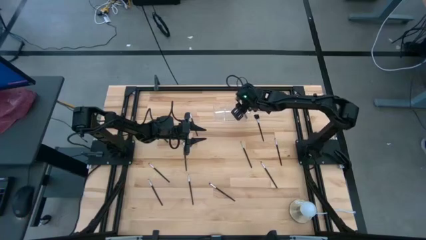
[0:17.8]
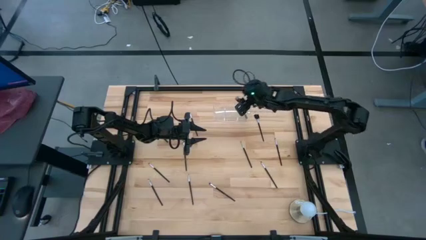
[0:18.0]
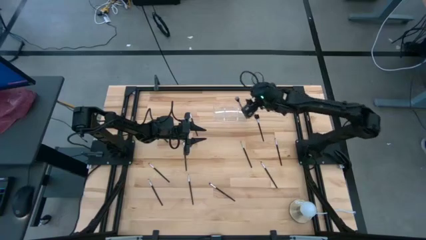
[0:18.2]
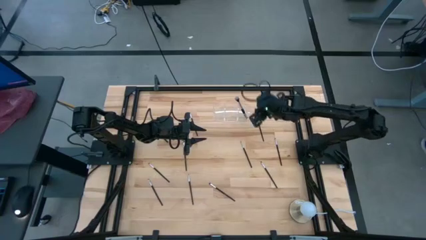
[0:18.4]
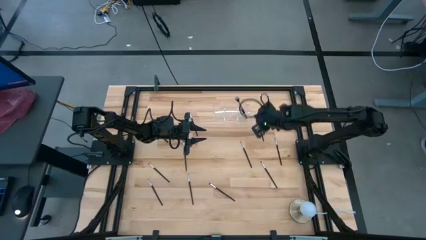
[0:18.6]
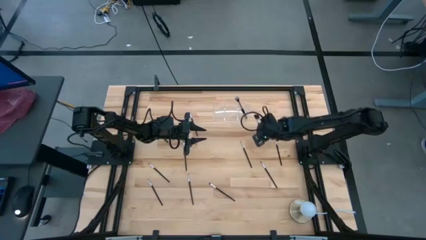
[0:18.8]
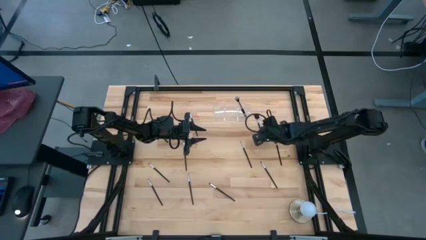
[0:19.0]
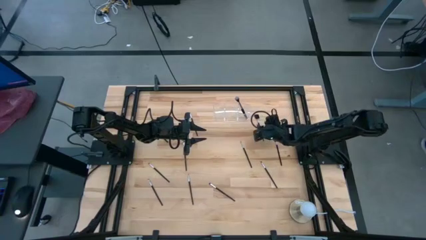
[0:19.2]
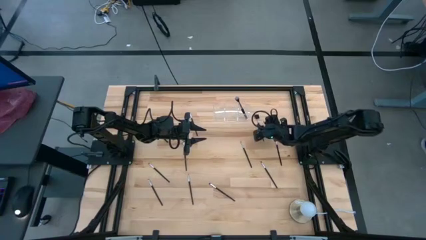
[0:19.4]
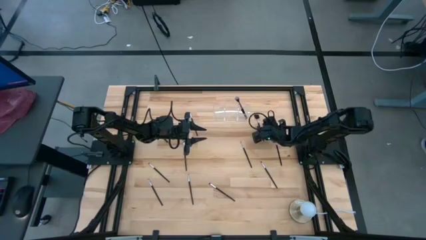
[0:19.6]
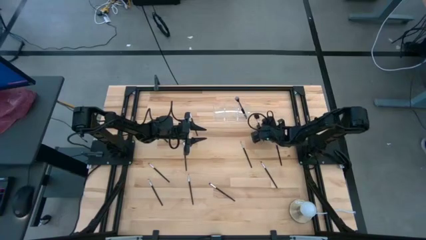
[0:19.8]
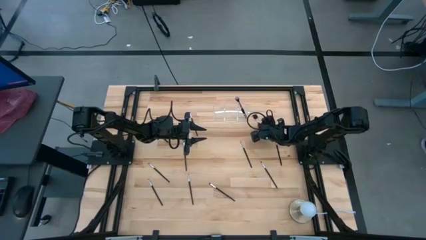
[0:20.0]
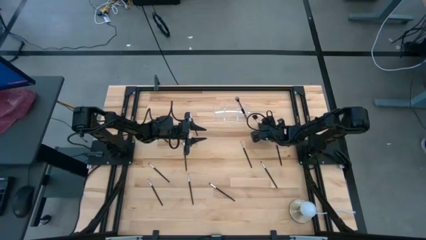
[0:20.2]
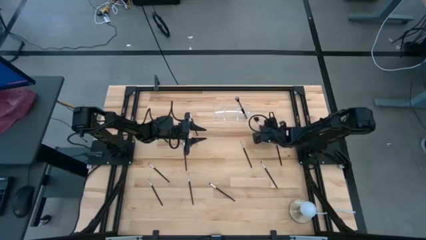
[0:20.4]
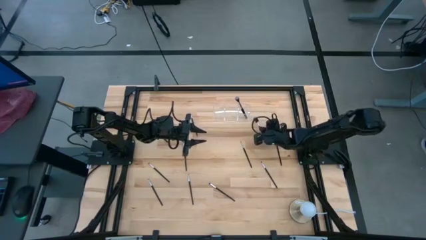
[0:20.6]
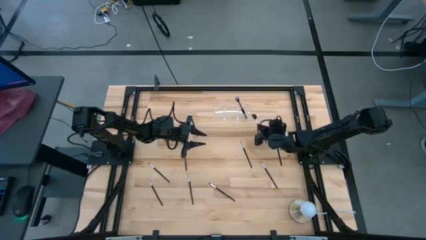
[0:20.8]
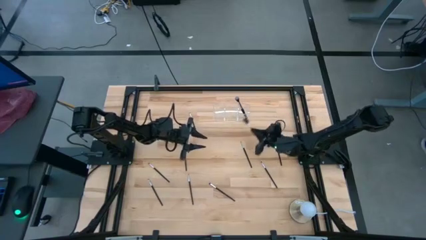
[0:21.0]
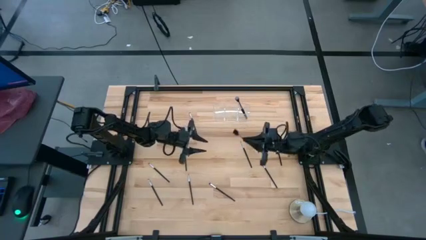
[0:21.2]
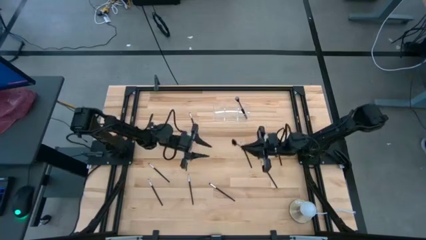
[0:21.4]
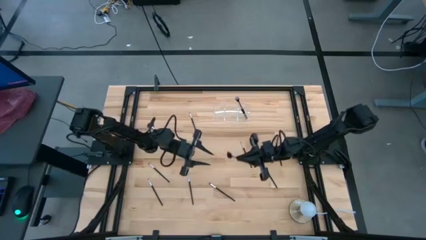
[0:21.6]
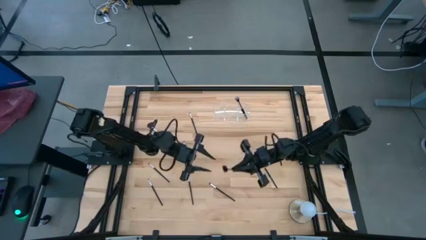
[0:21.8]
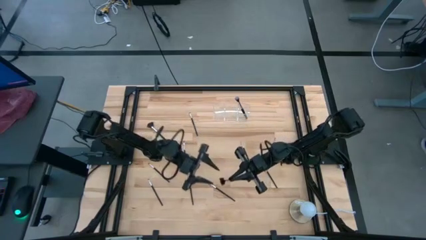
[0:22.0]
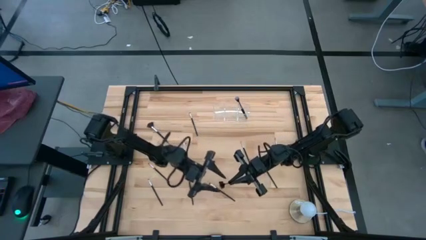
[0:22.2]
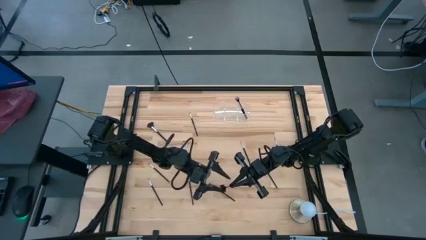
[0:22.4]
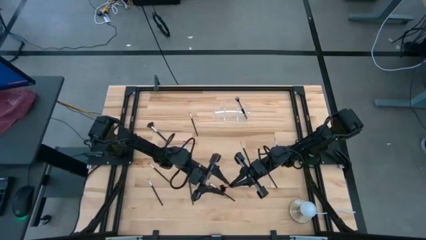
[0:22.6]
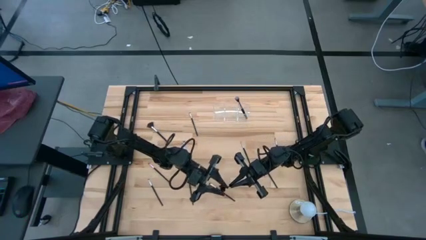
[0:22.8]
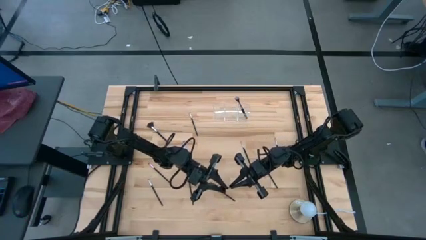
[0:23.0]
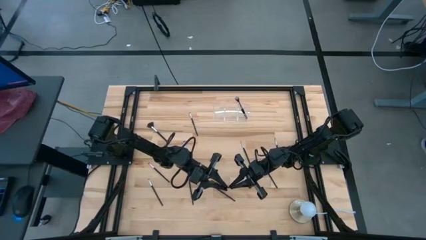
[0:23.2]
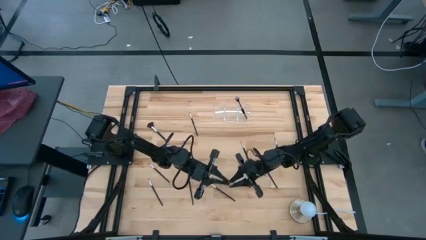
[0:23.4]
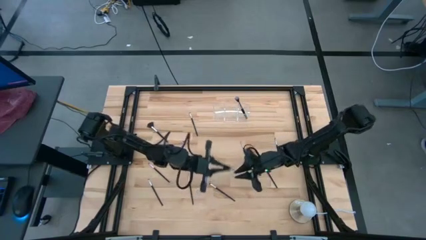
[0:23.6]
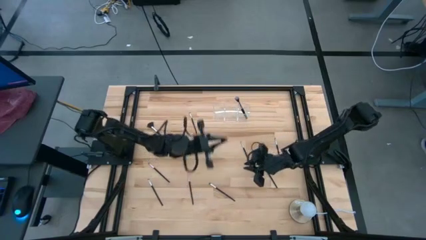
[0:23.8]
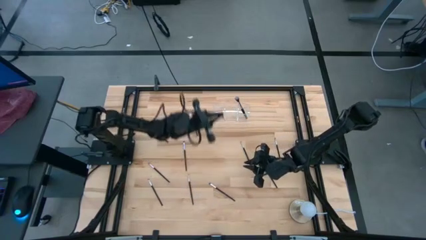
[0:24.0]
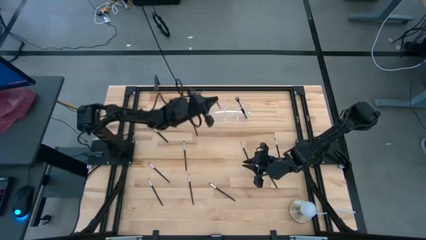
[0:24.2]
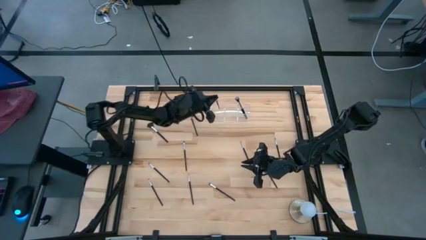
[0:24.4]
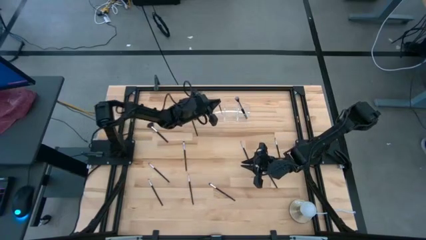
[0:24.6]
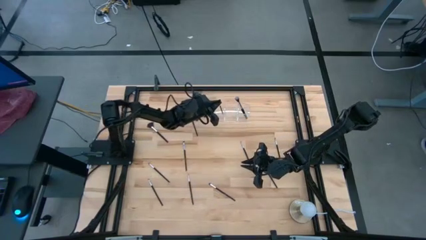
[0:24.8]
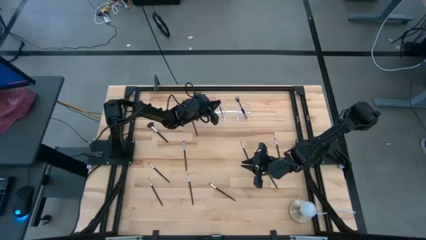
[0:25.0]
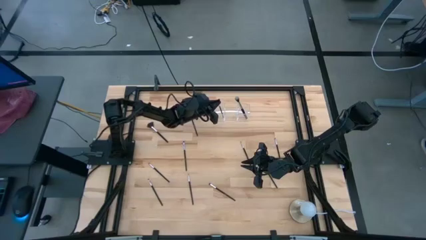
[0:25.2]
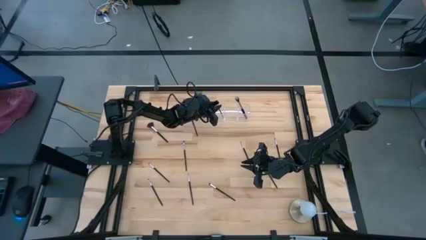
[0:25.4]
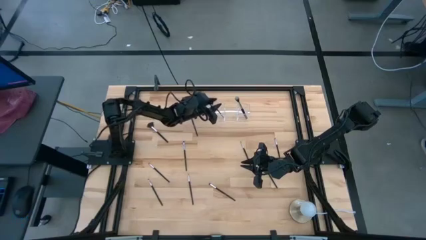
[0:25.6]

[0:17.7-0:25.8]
Task: Put items in baskets/containers
Put the black brow brush into the transparent organizer

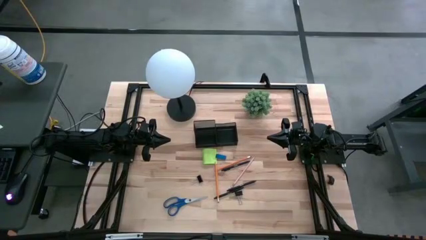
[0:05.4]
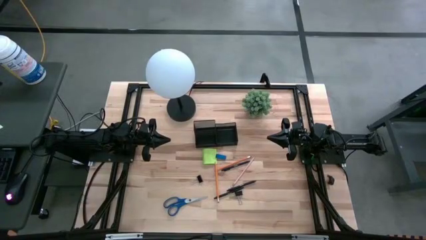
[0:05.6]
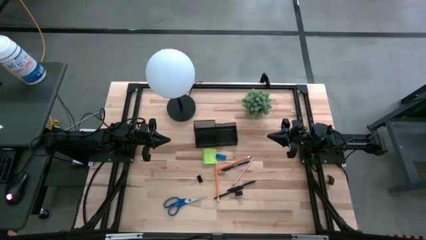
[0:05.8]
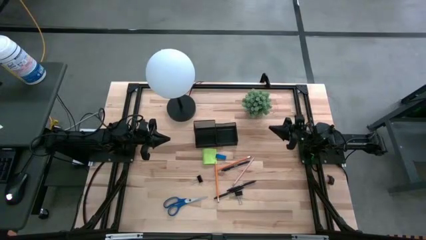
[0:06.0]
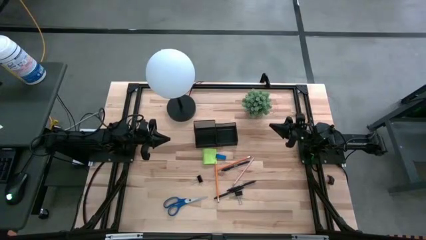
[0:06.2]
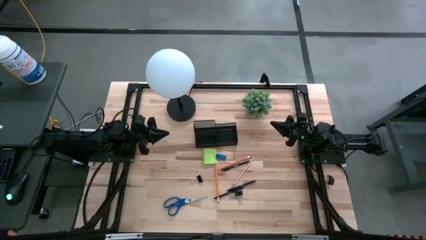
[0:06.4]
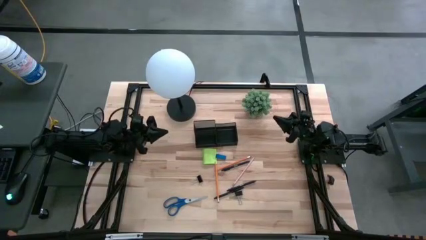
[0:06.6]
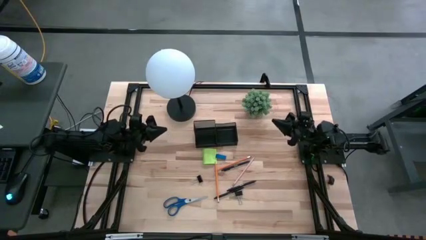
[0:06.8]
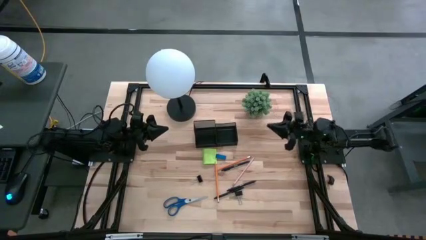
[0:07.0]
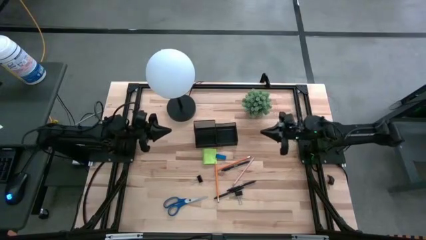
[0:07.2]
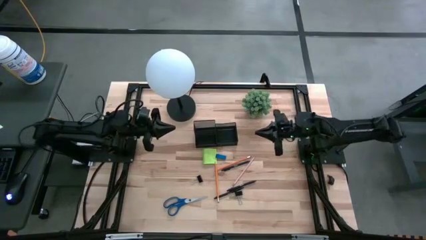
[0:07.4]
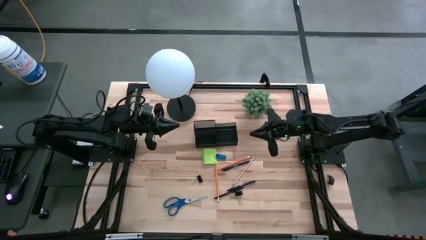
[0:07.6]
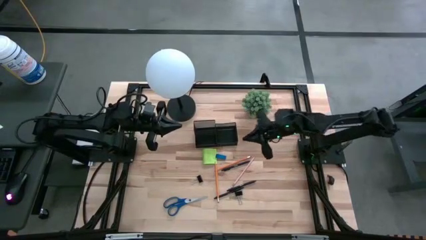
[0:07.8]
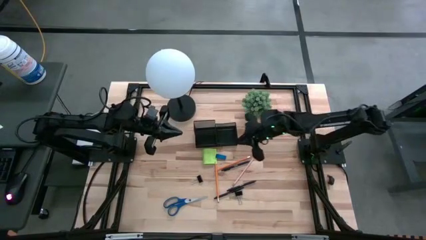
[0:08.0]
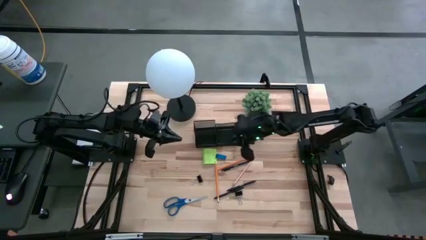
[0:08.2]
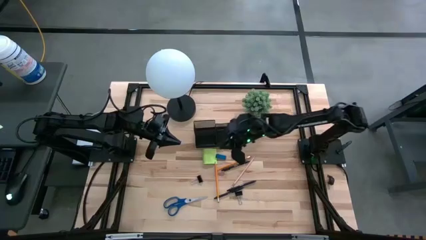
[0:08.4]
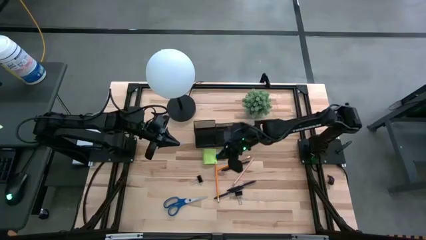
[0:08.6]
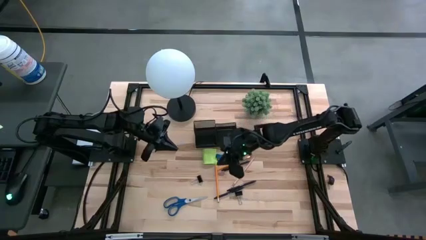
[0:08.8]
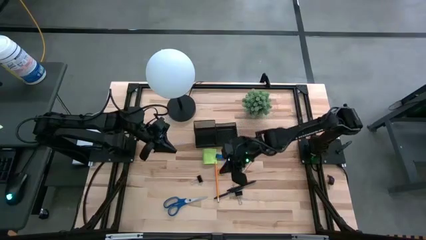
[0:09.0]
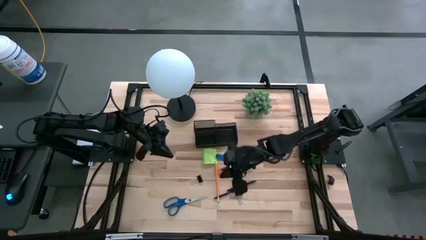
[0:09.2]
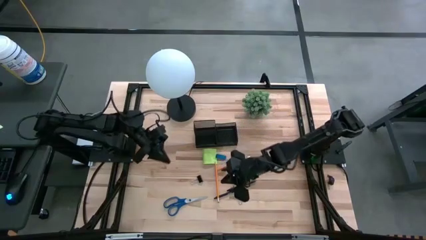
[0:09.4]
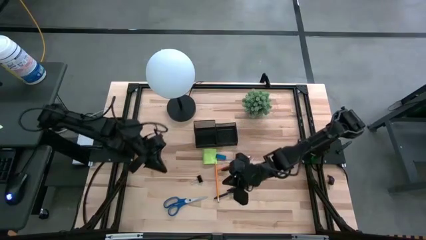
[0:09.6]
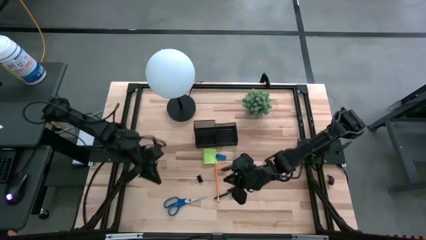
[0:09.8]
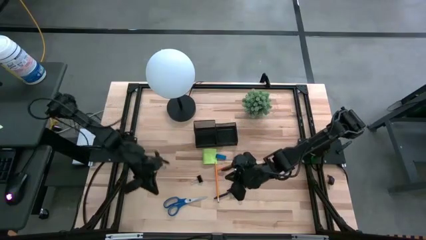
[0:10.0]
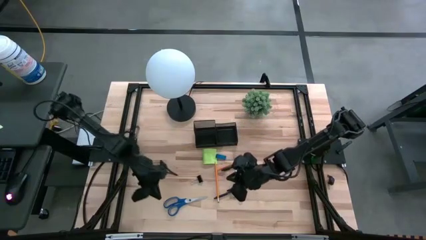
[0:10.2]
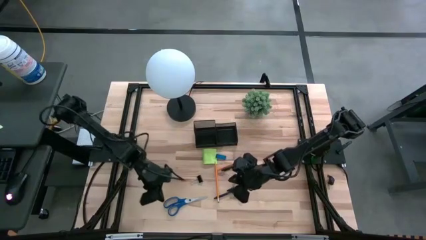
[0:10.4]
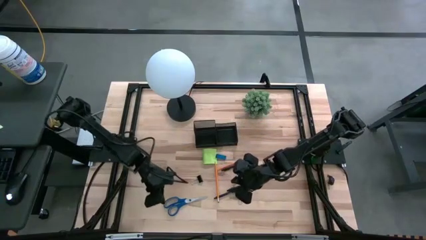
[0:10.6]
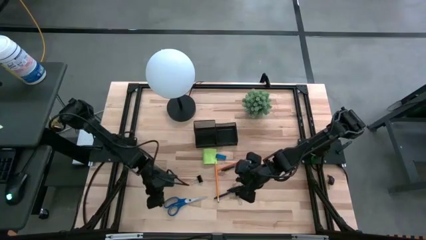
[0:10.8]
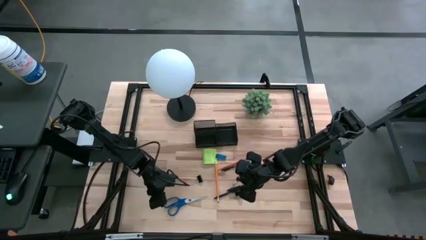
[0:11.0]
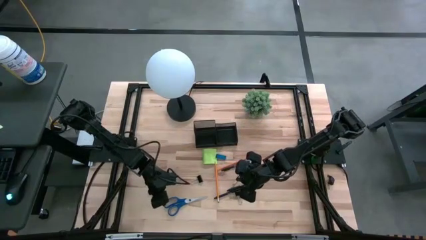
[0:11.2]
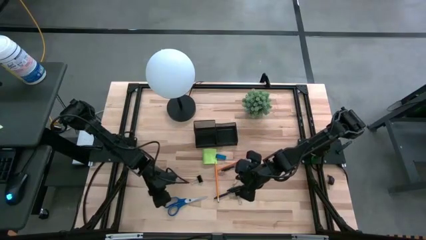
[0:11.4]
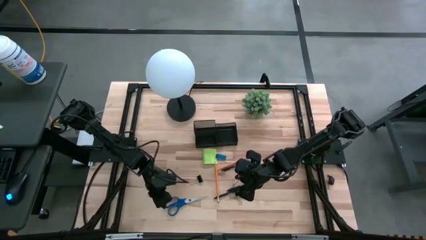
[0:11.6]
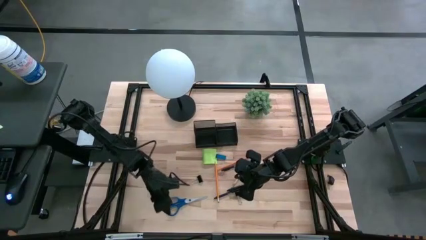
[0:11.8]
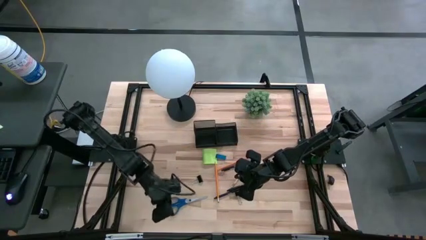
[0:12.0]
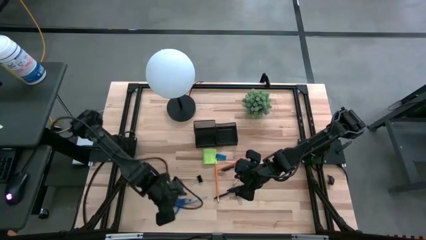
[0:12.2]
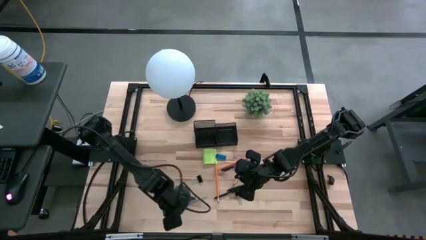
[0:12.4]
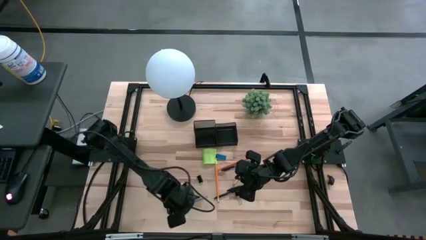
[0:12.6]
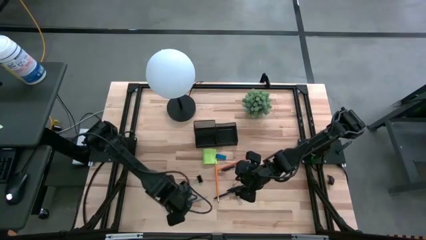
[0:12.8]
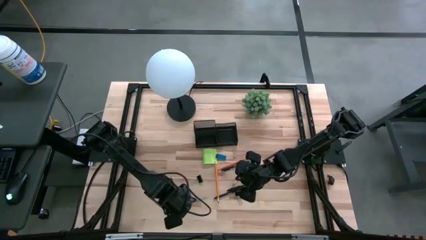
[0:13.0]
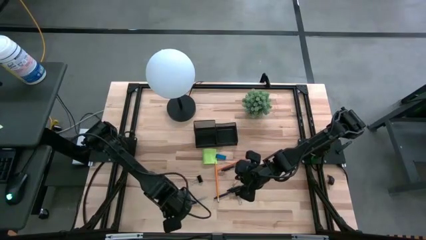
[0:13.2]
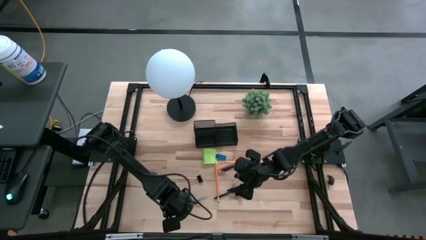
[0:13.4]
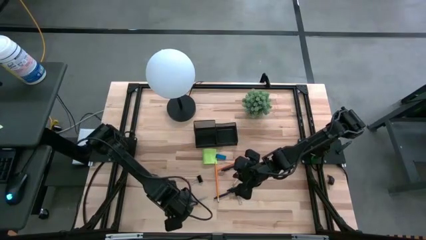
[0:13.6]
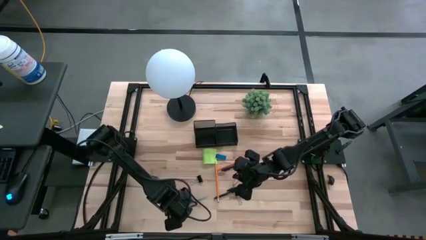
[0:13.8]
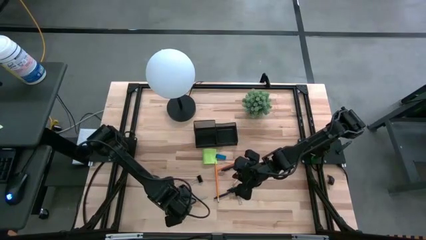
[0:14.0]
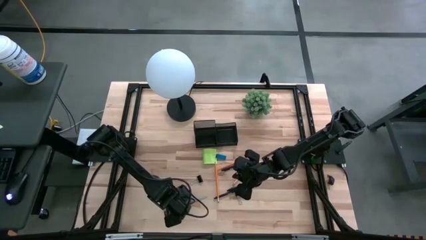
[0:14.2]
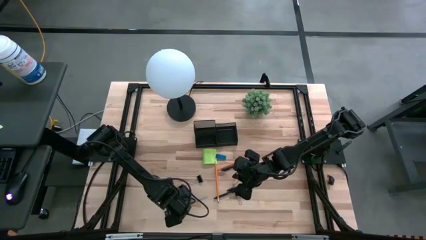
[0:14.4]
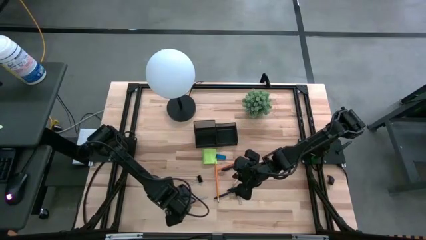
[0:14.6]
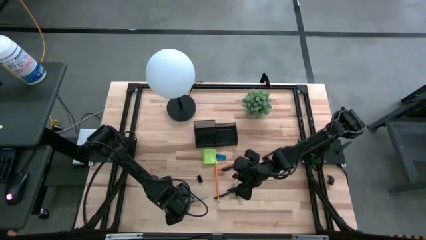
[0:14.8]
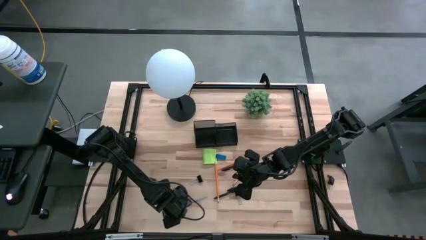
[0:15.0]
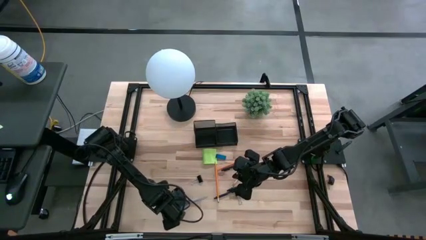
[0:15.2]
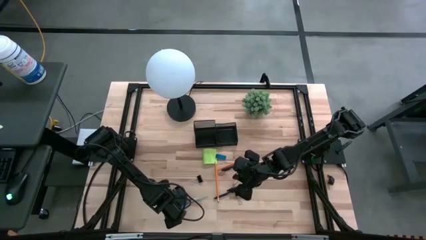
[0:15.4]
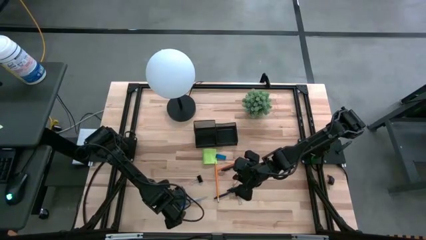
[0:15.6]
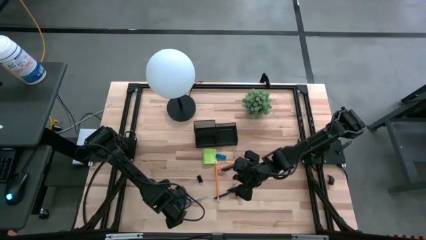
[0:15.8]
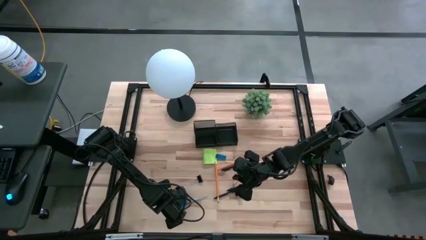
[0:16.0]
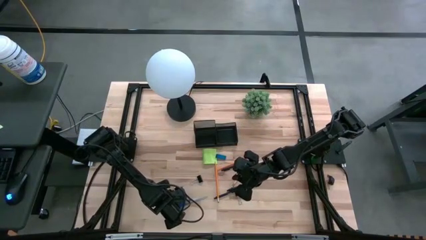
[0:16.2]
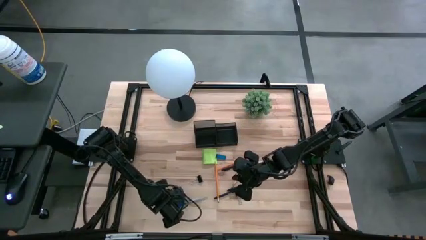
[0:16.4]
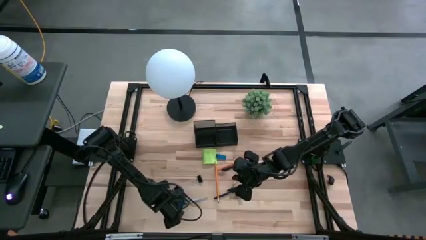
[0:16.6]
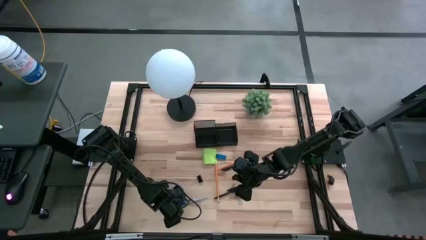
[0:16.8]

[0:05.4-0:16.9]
Task: Pick and place office supplies into organizer
Put the blue scissors into the top left side of the desk organizer
